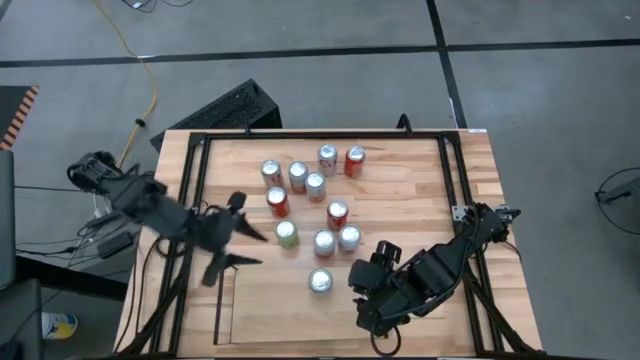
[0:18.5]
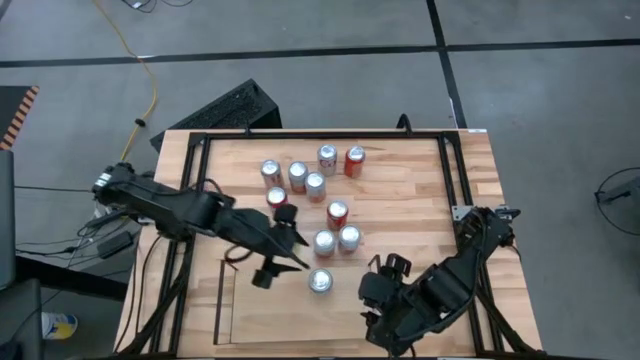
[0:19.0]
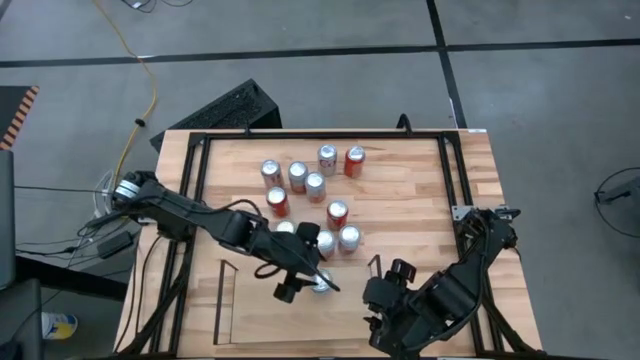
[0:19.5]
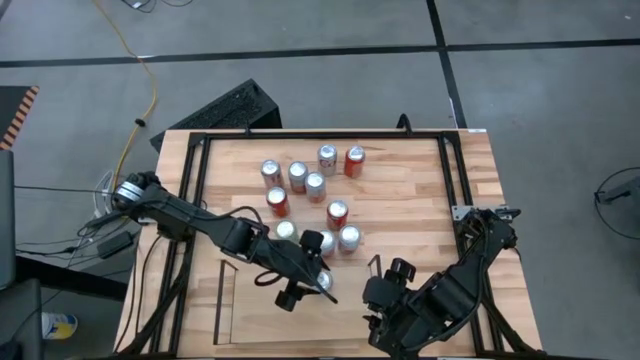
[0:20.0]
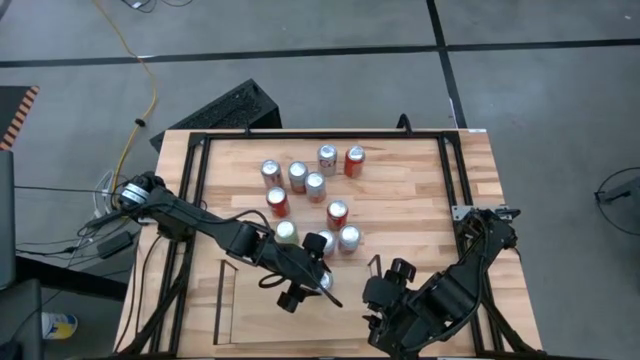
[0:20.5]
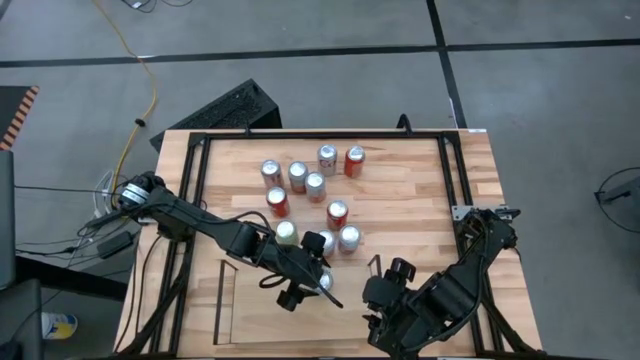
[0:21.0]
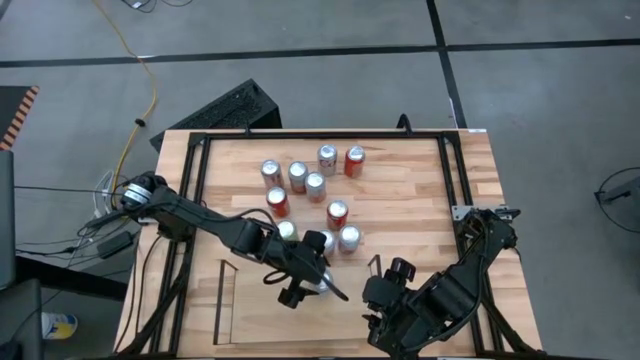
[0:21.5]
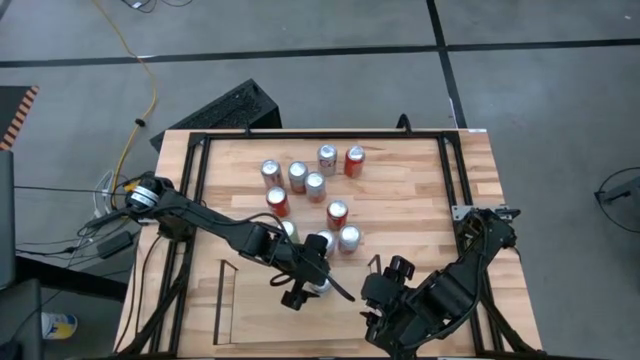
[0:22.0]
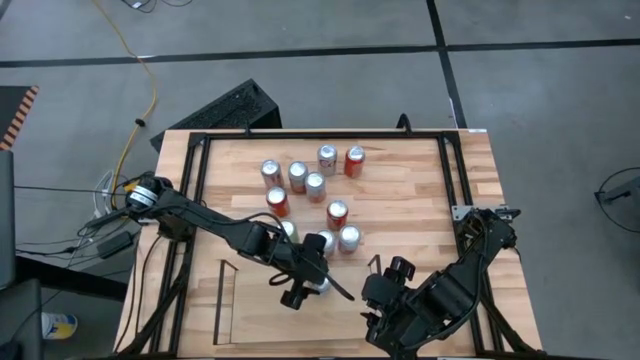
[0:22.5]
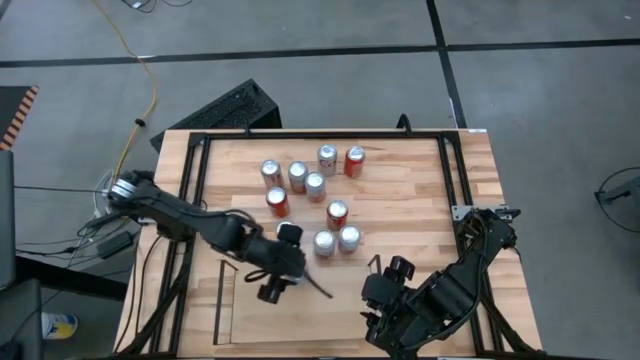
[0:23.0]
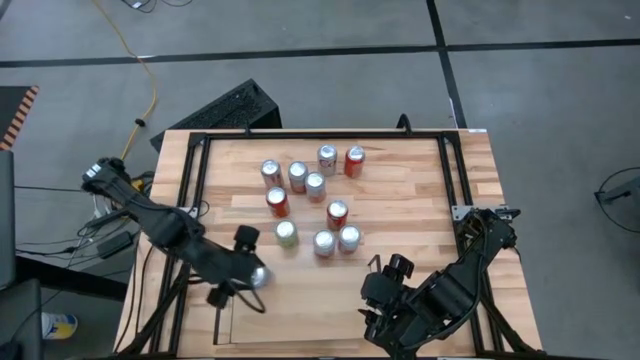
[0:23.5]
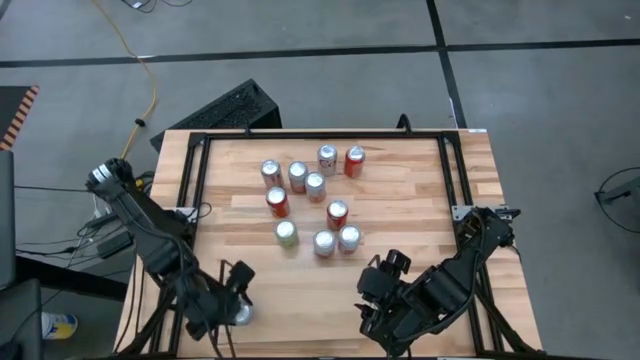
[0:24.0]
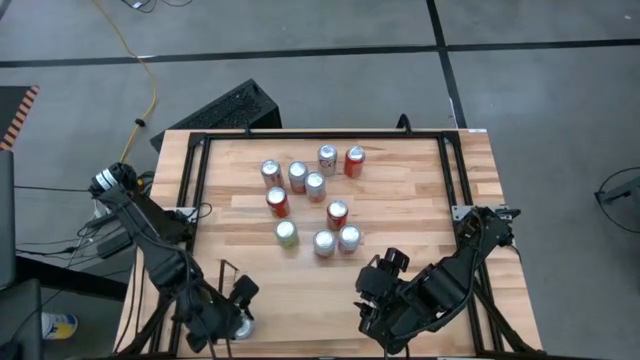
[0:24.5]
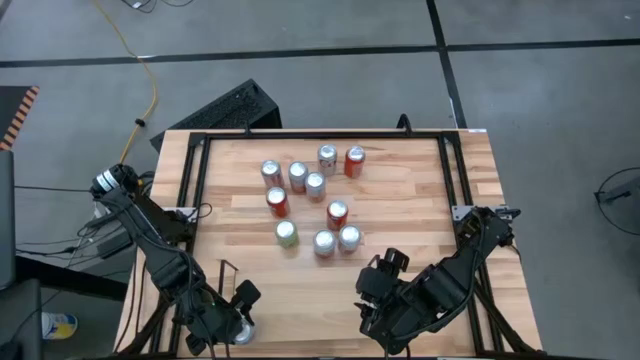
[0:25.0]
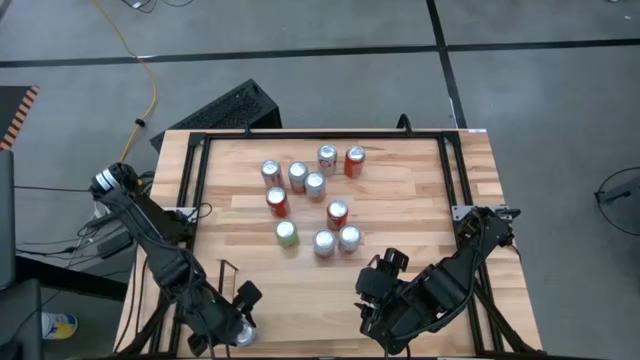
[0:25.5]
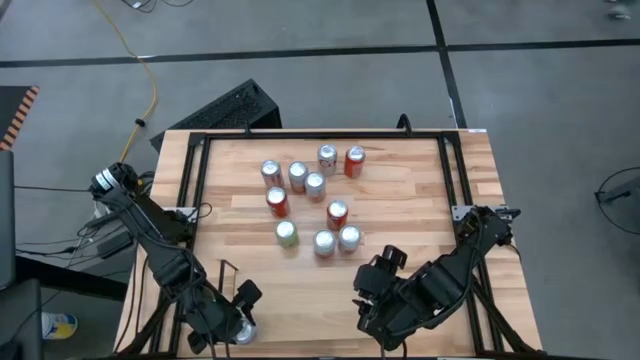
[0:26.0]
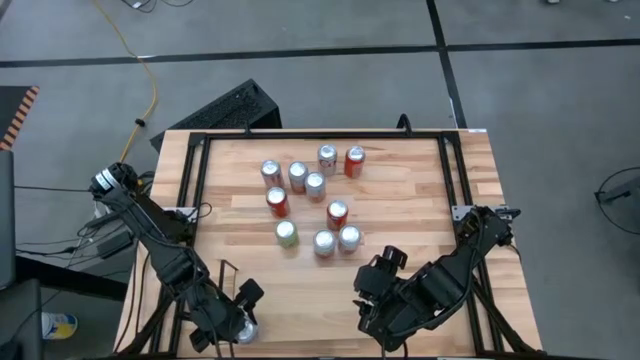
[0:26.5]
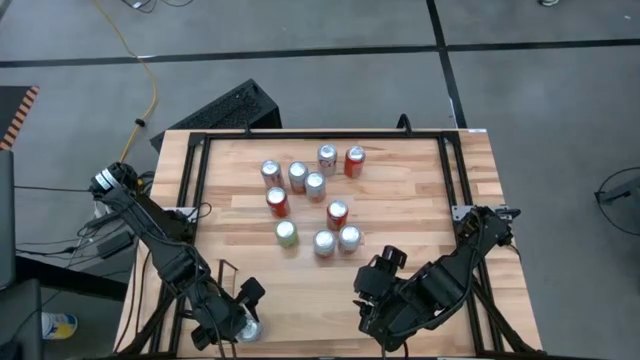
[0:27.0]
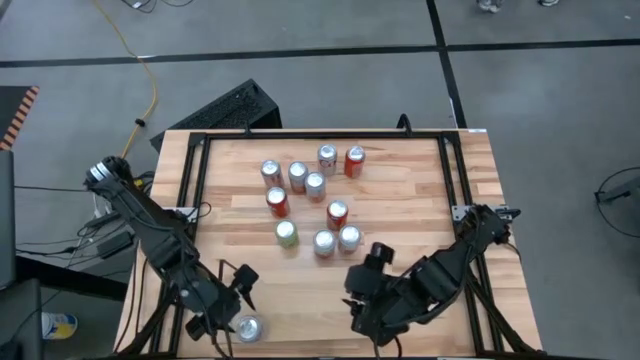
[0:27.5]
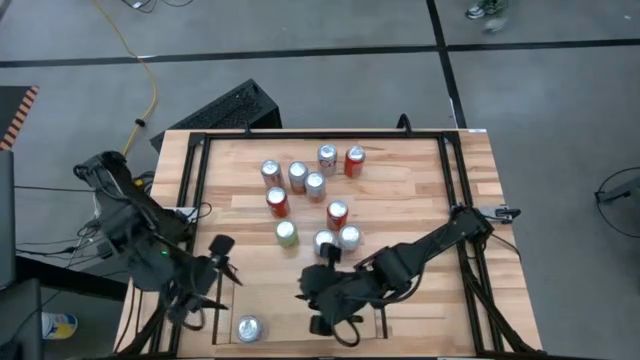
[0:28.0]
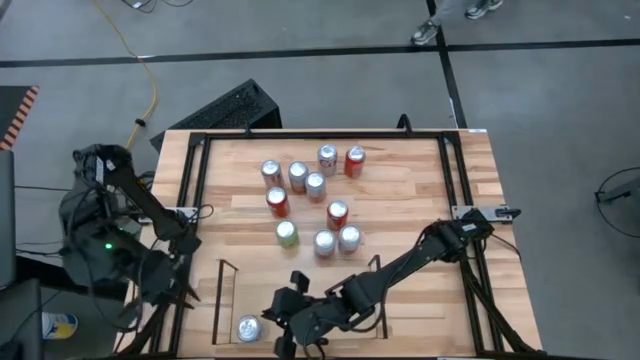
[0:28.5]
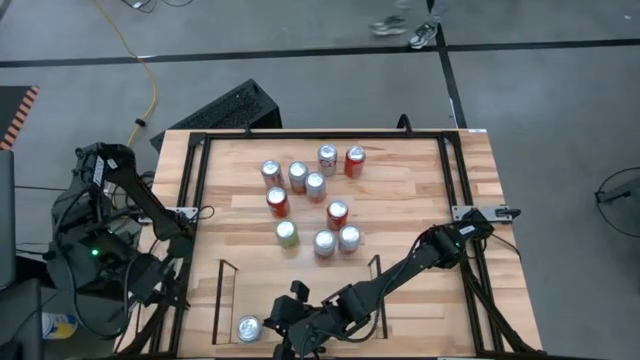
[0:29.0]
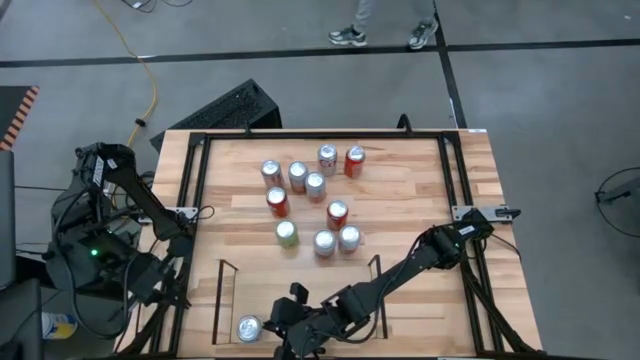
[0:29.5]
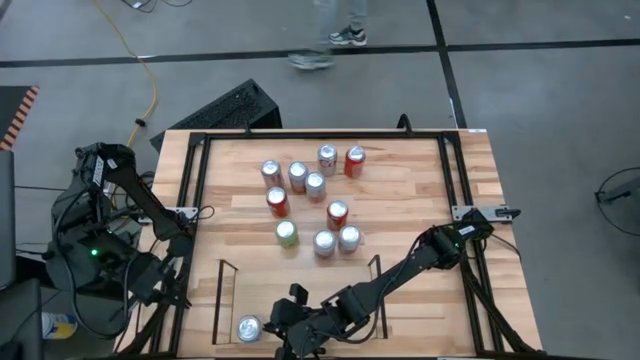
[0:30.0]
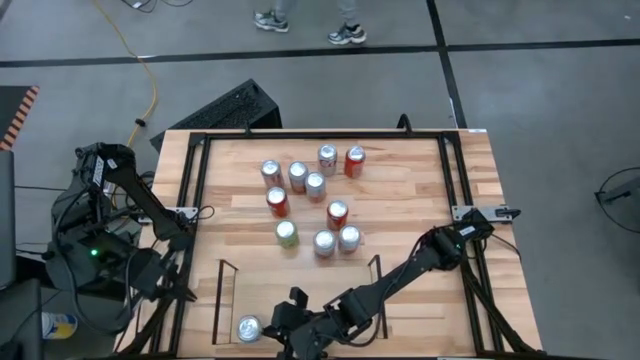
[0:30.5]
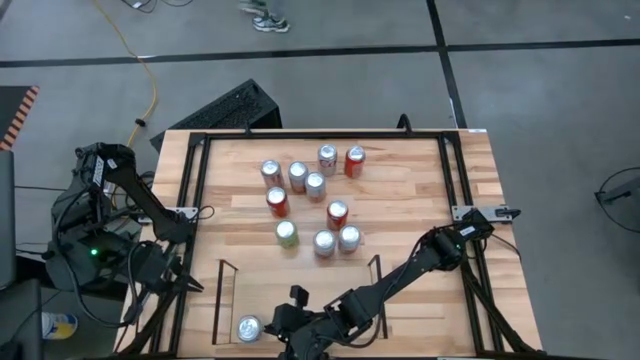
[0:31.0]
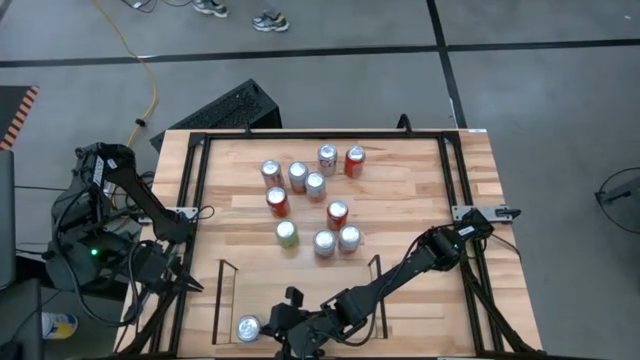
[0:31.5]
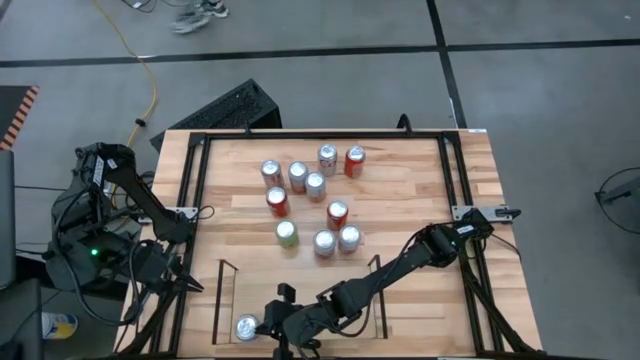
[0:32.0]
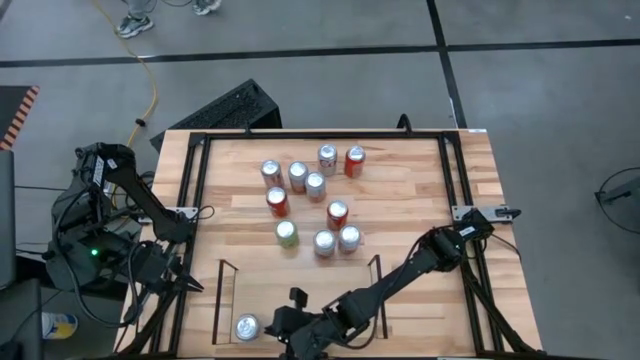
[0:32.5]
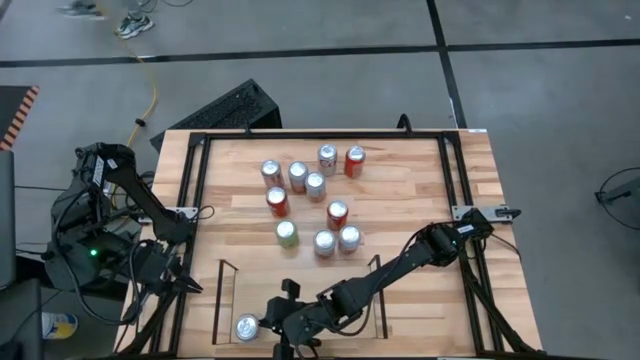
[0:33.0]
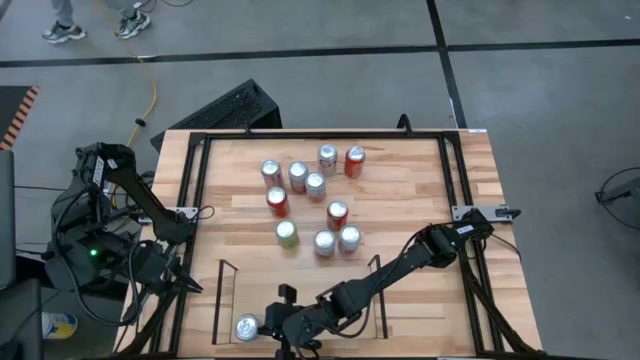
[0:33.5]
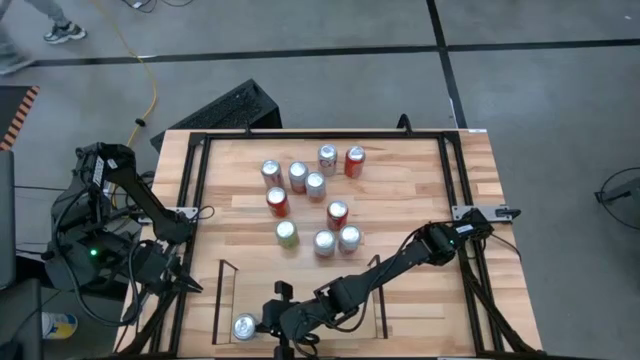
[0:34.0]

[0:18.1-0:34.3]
Task: Place canned beverage on shelf
Put the silver soda can on the shelf

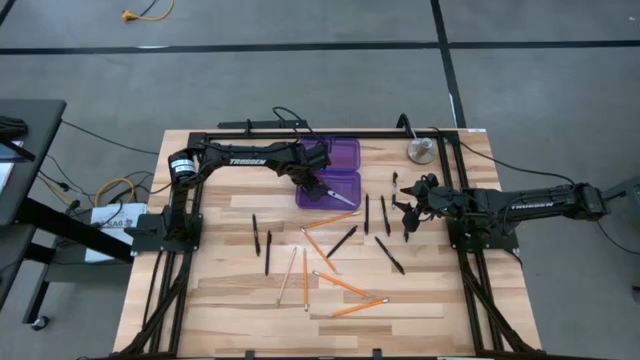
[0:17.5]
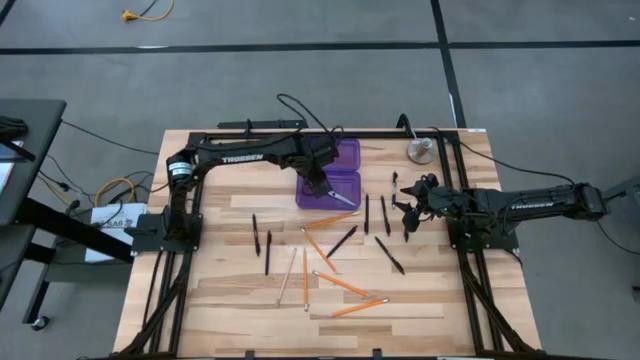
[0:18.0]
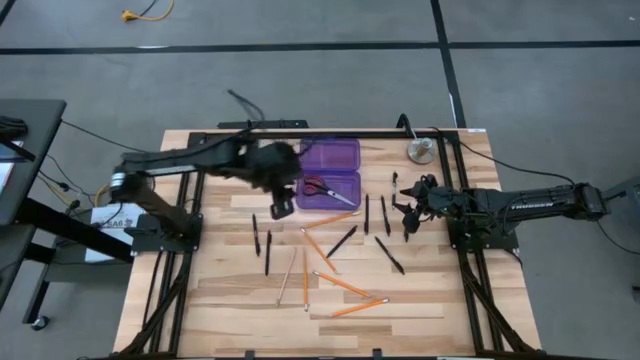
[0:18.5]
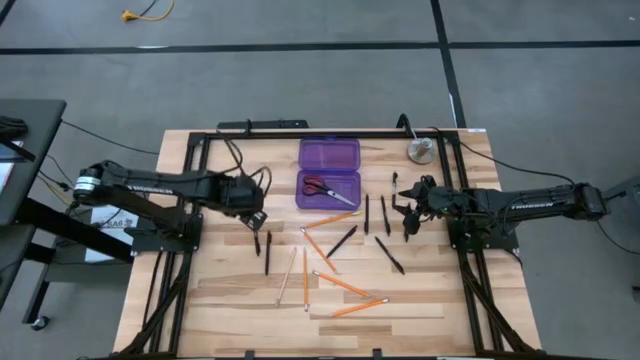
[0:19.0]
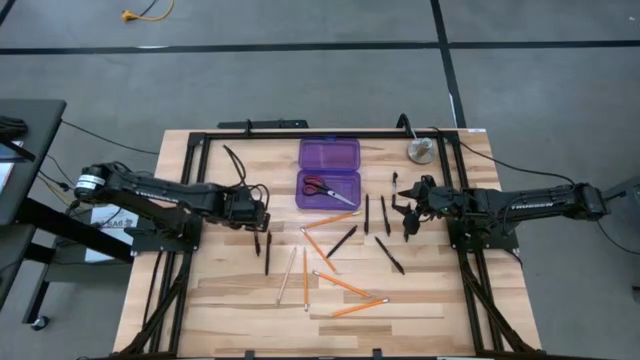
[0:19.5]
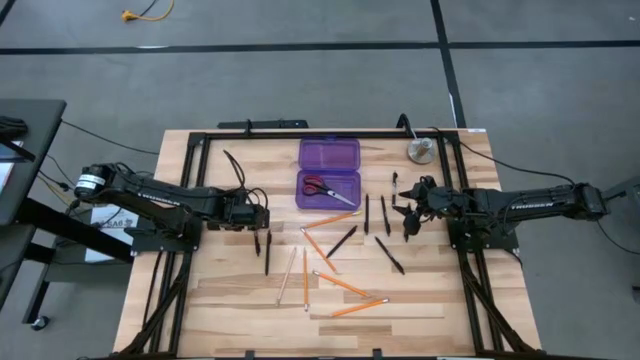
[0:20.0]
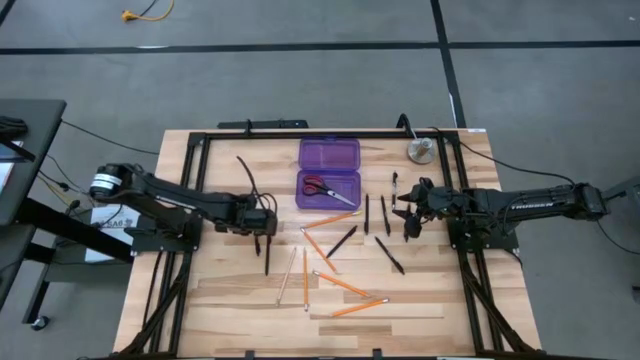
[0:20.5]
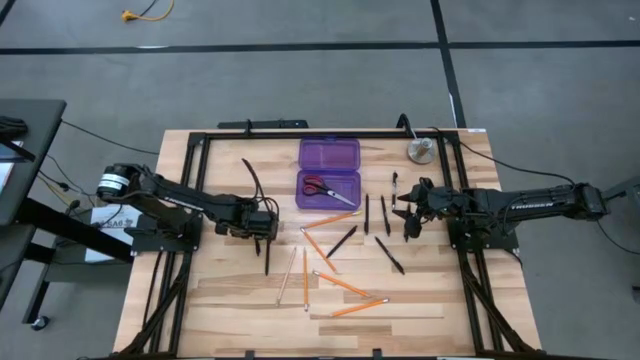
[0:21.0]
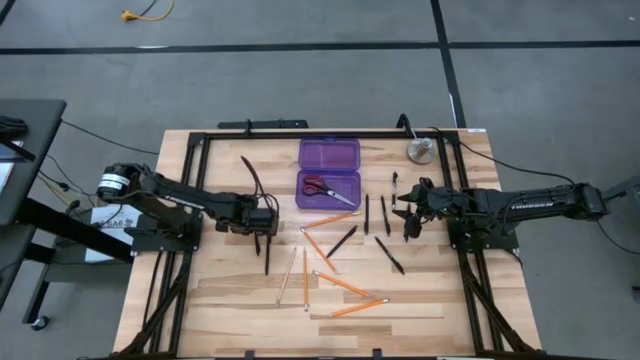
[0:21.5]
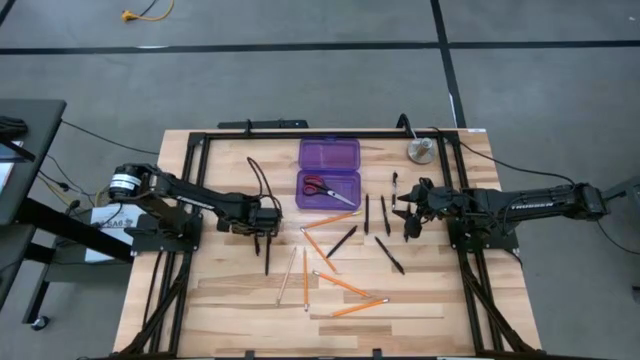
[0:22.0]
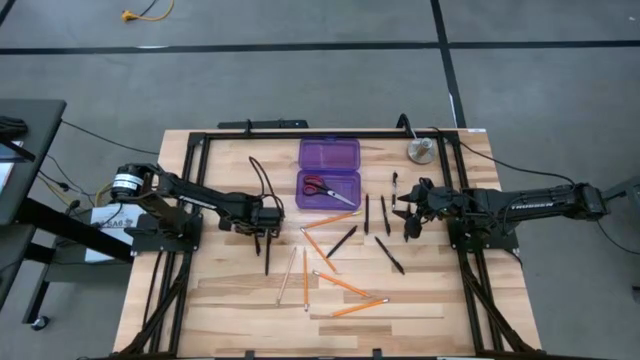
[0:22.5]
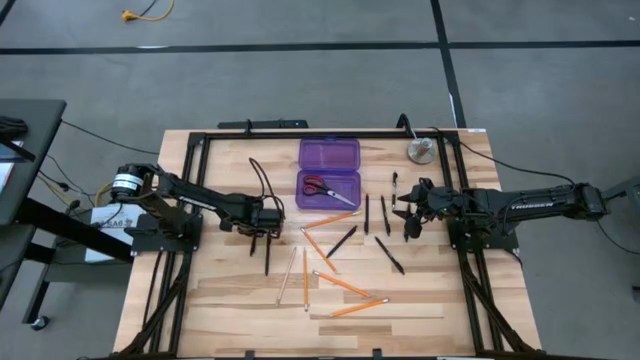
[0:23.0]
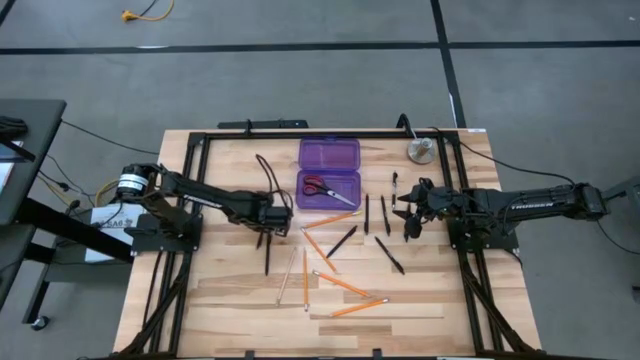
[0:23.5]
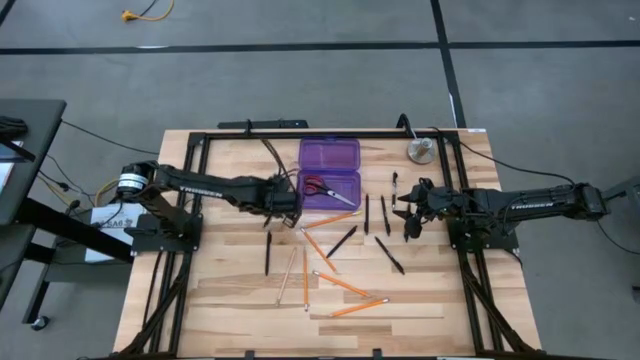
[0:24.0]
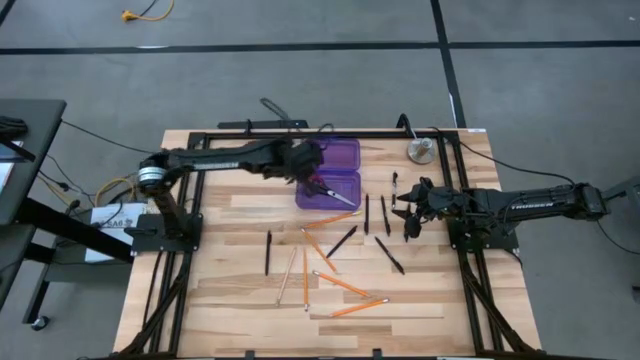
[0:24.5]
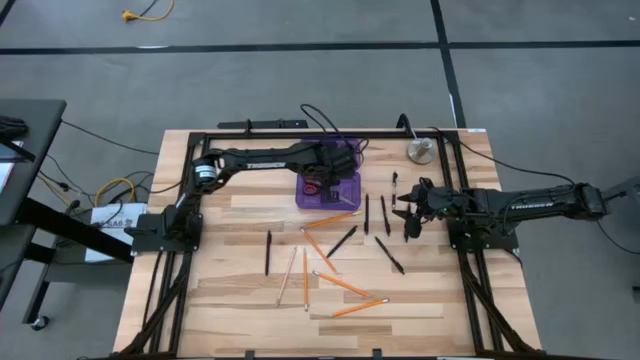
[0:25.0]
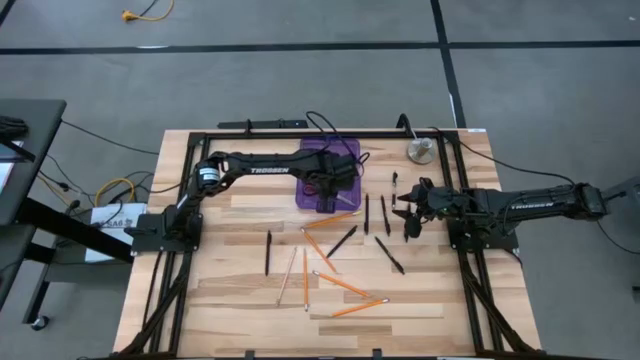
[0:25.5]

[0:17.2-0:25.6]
Task: Pick & place school supplies into a supply box
Put the black pen into the violet supply box
